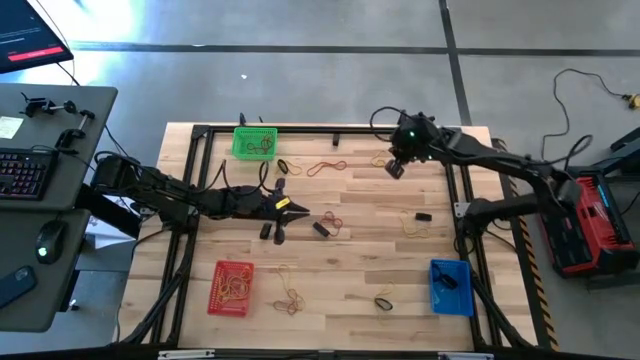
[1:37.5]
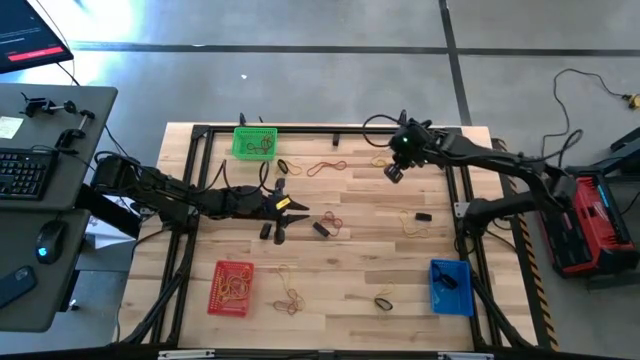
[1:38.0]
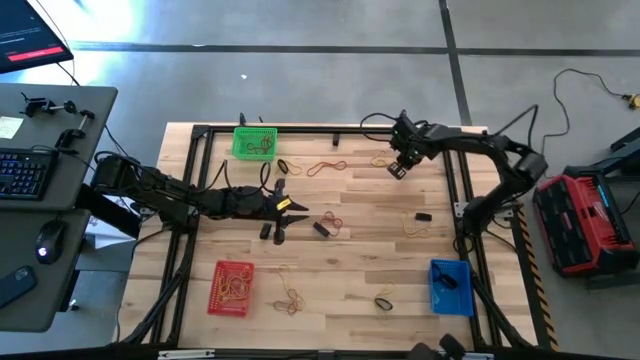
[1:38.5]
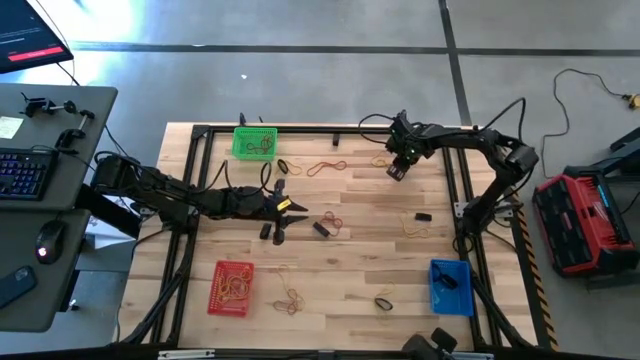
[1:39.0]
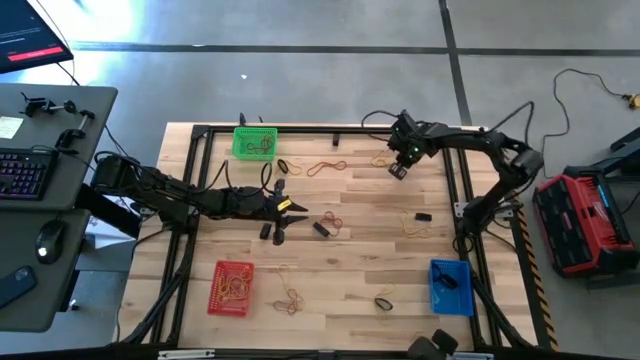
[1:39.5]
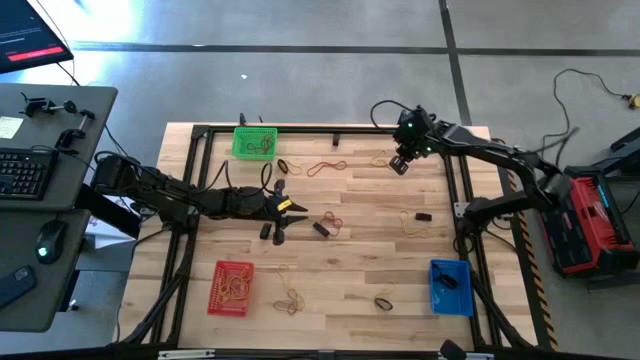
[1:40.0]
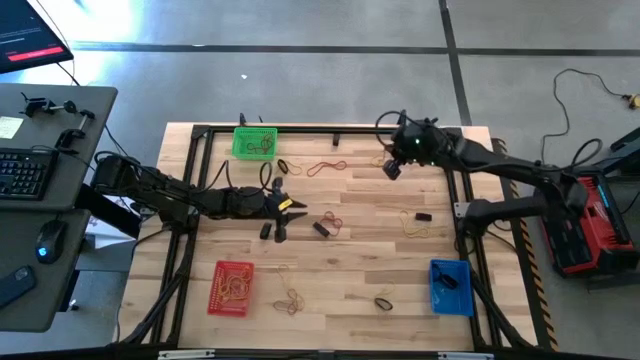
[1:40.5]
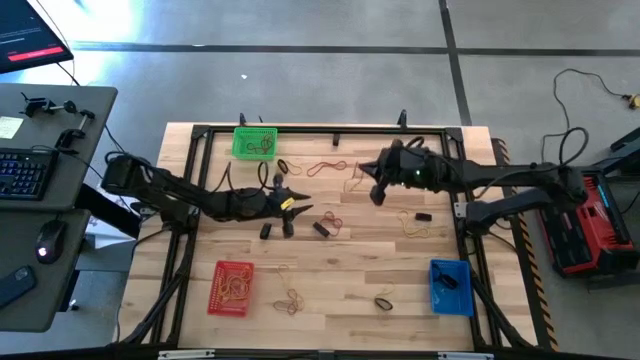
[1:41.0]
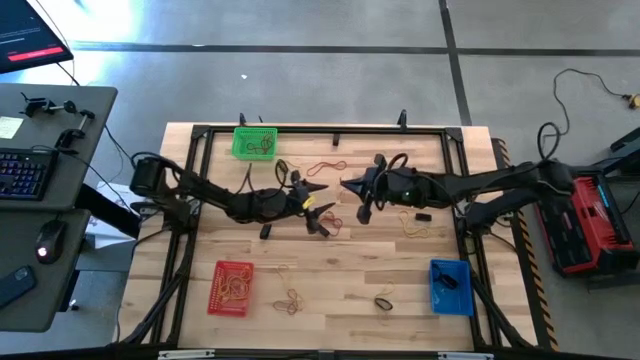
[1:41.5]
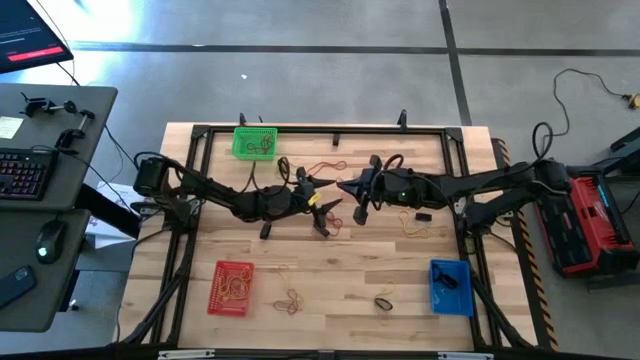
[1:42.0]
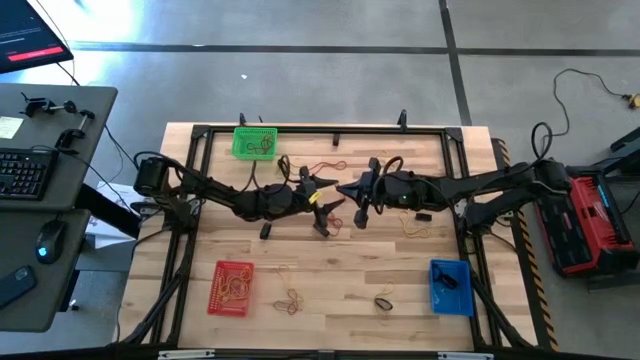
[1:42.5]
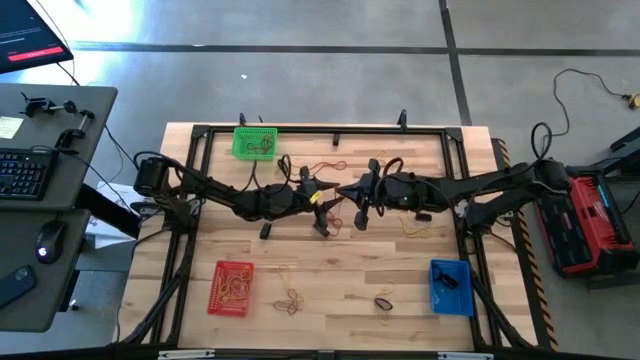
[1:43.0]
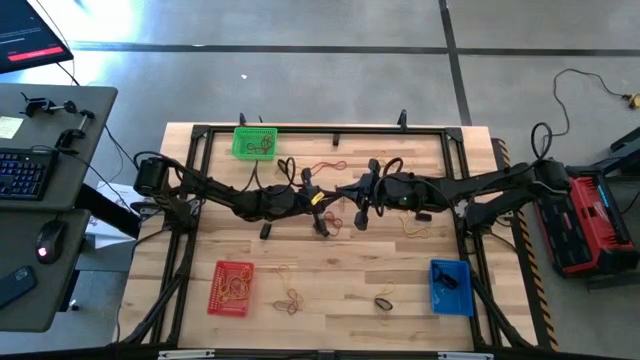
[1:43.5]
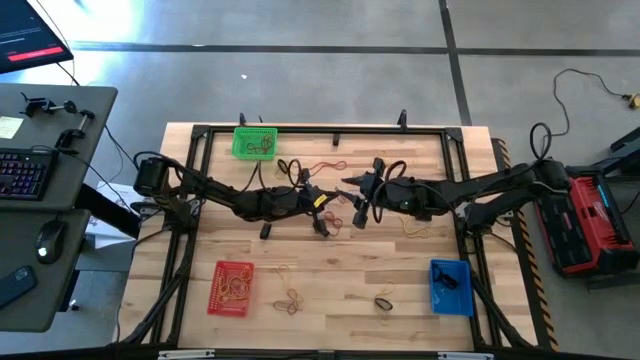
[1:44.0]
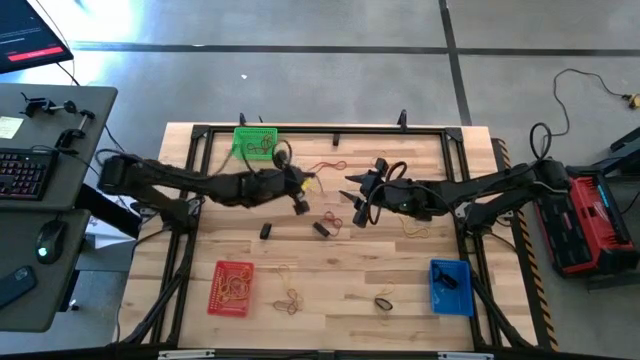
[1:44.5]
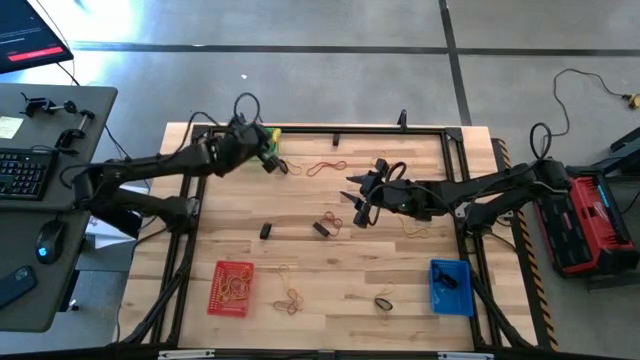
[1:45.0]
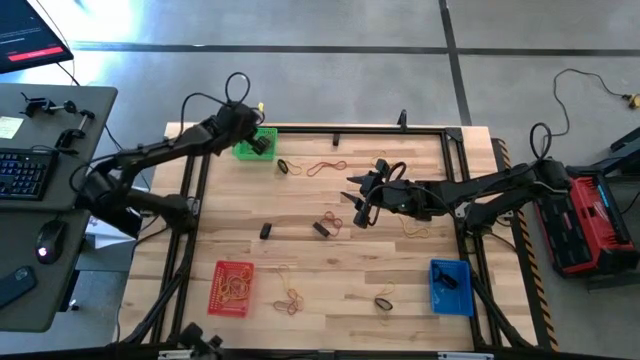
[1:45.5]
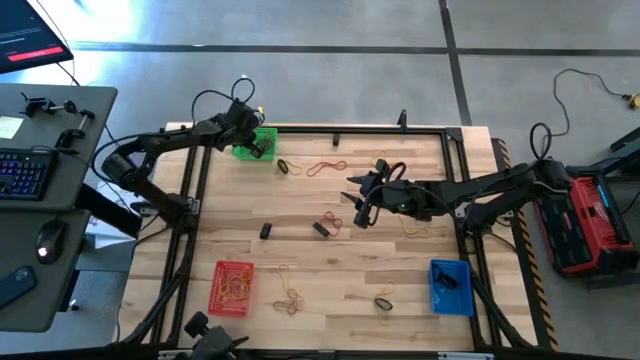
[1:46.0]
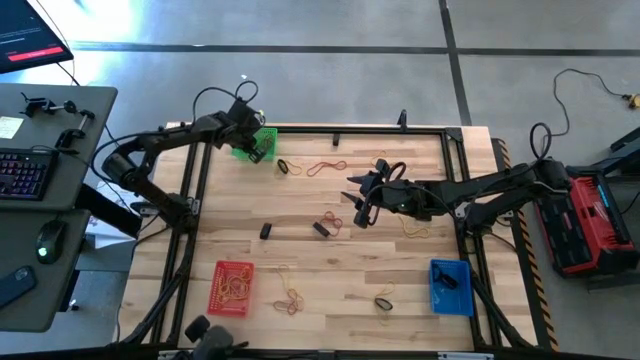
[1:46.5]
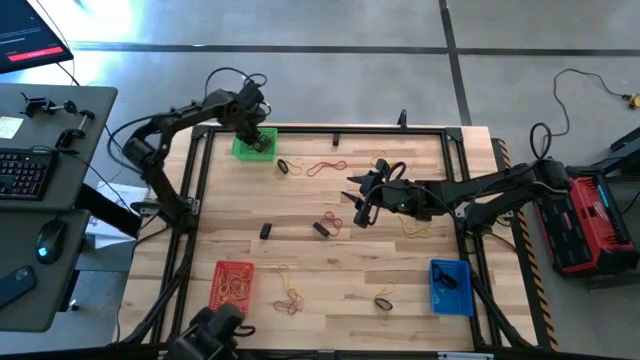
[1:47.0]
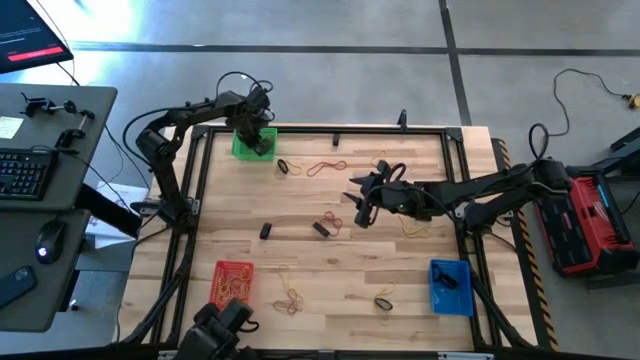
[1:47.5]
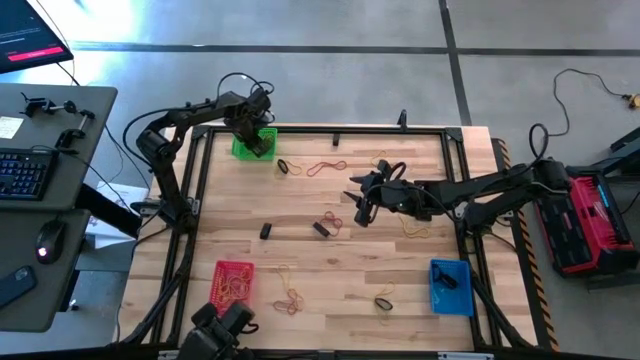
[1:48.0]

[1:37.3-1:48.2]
Task: Sort rubber bands into baskets
Put the red rubber band into the green bin

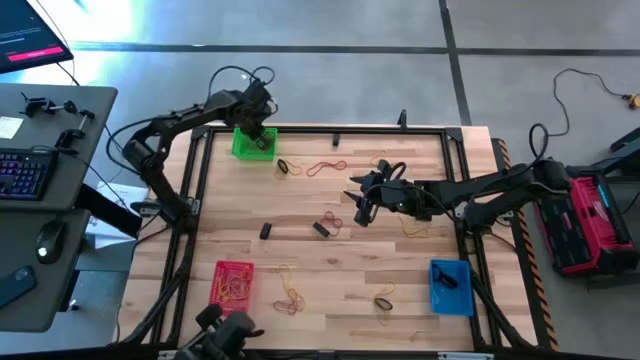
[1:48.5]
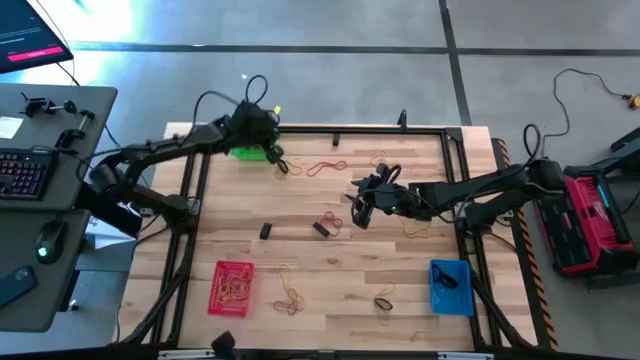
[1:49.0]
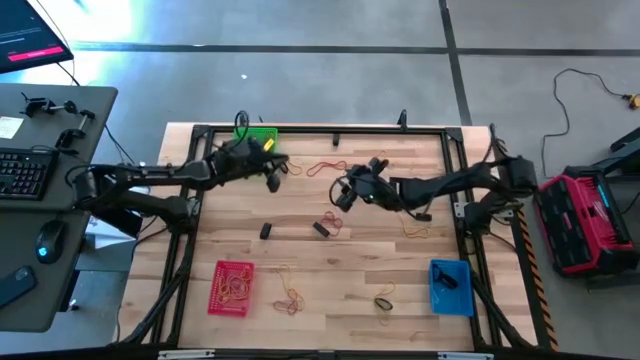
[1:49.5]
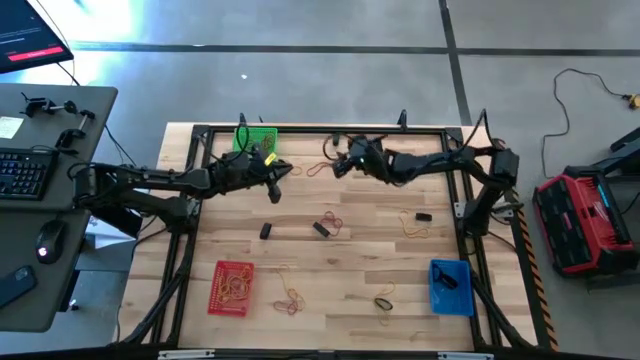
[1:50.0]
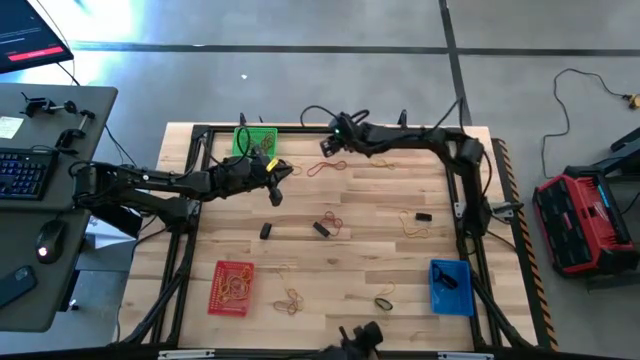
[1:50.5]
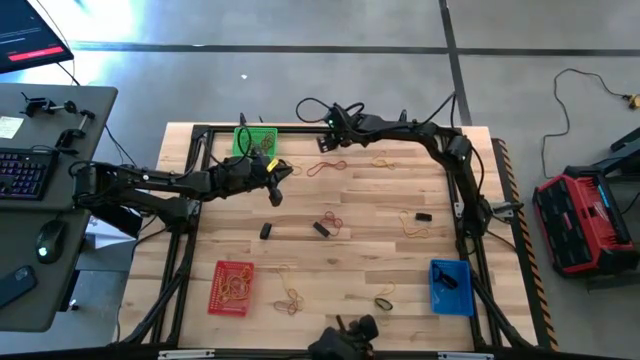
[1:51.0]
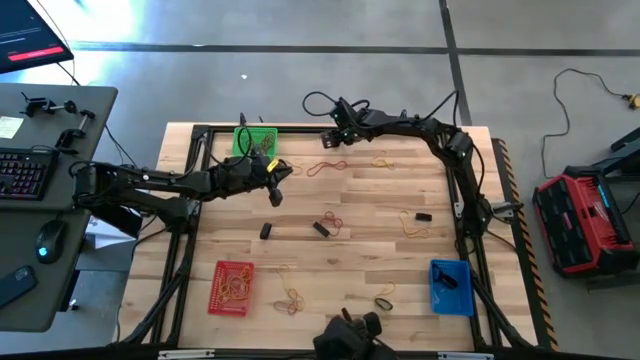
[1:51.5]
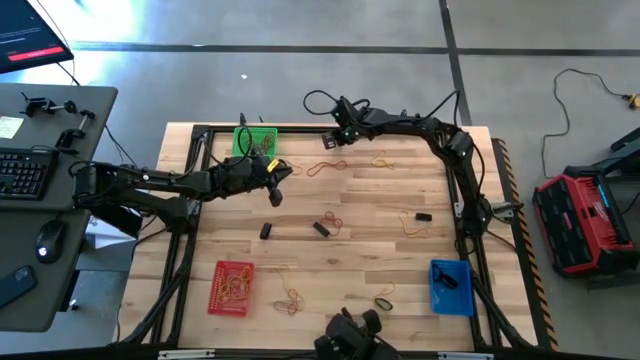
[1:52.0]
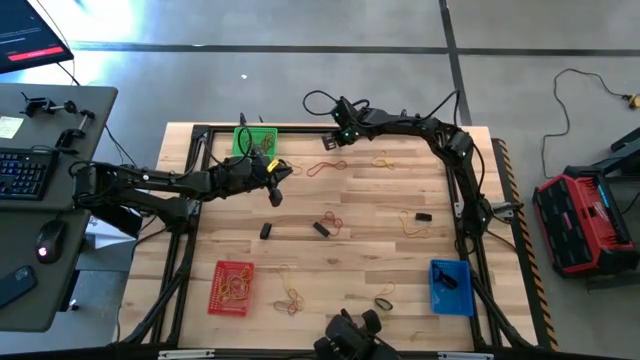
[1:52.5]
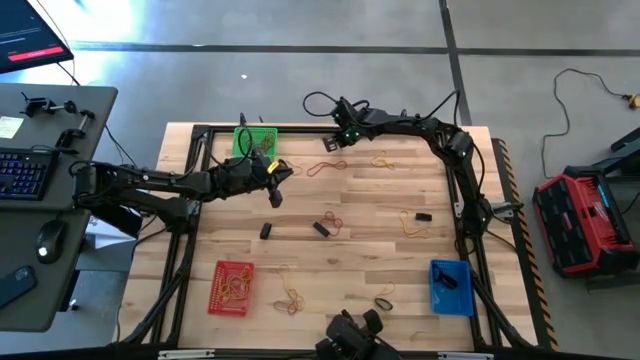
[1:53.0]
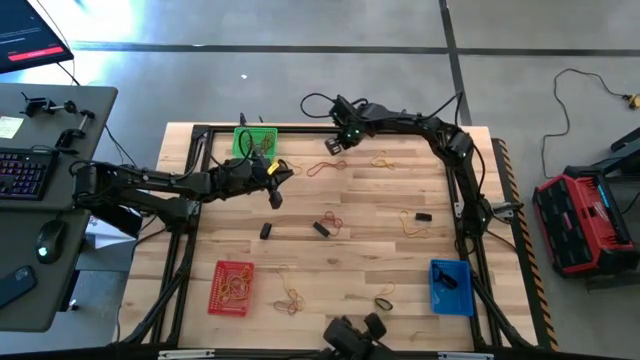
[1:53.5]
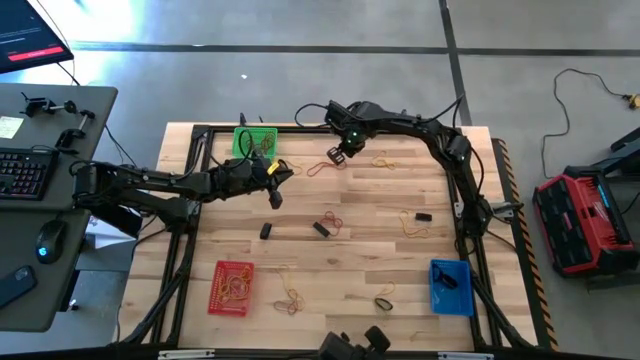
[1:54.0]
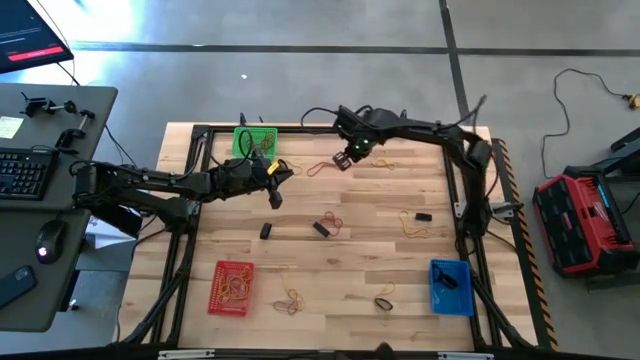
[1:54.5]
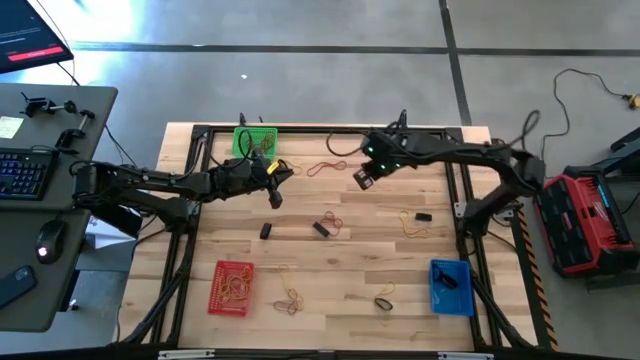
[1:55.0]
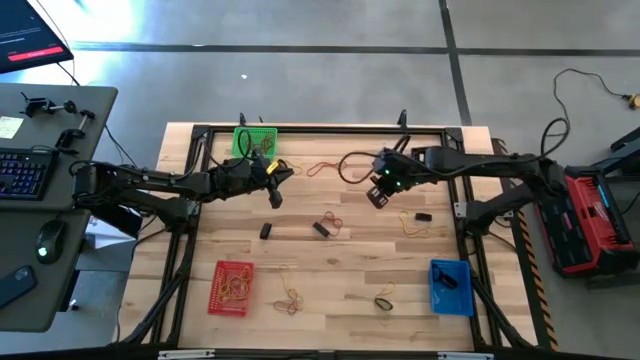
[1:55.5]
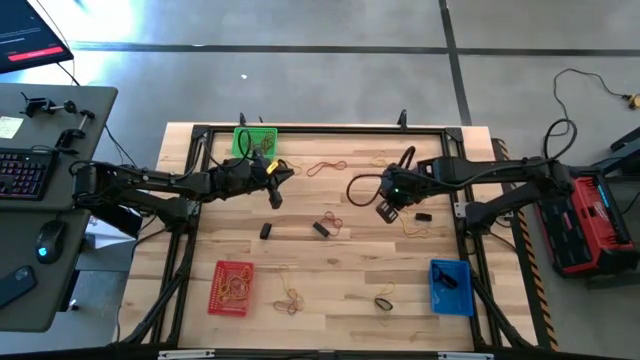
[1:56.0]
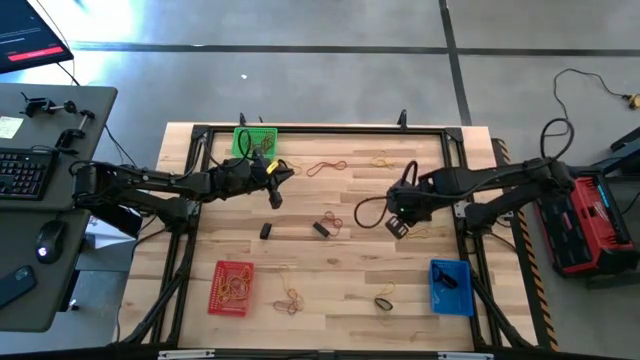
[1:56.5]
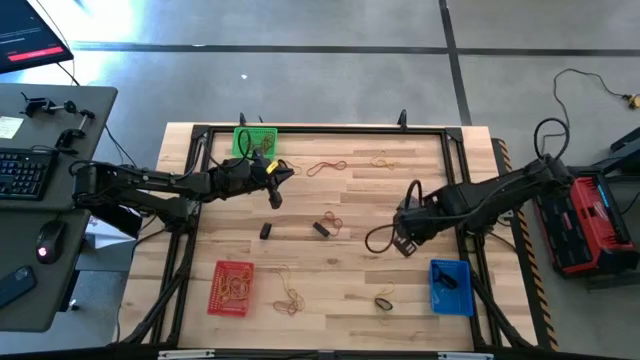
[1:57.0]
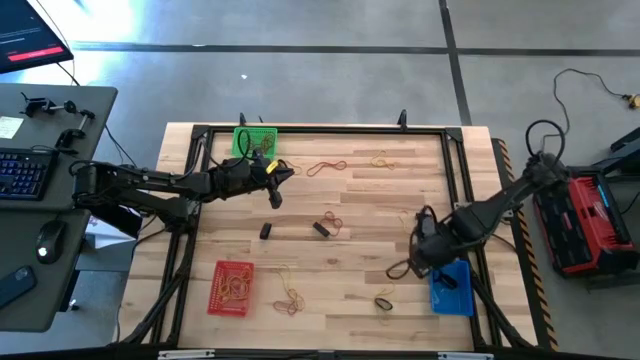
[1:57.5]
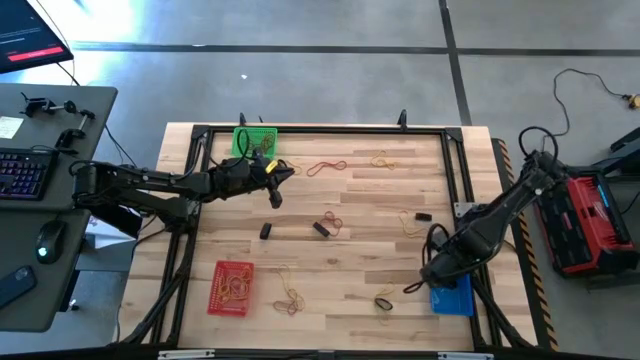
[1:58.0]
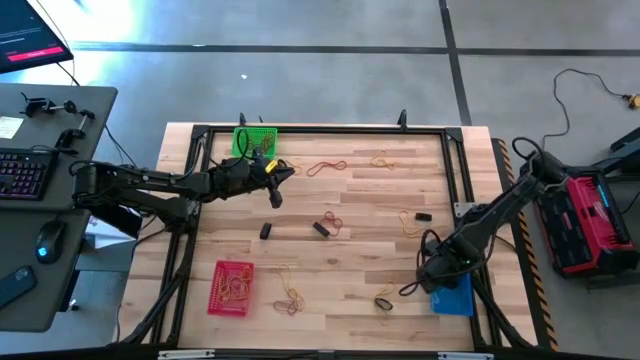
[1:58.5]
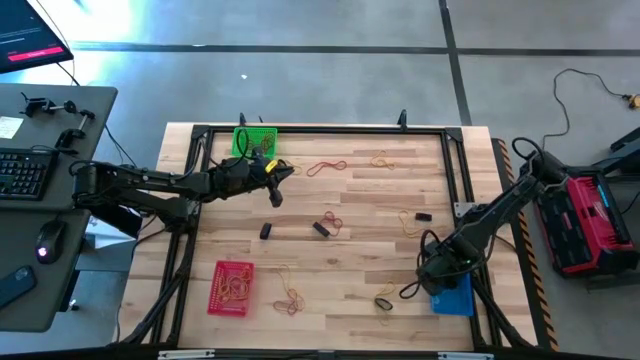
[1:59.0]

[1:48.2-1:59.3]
Put the black rubber band into the blue bin
